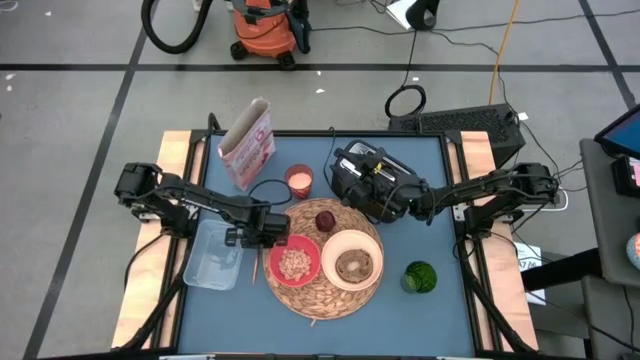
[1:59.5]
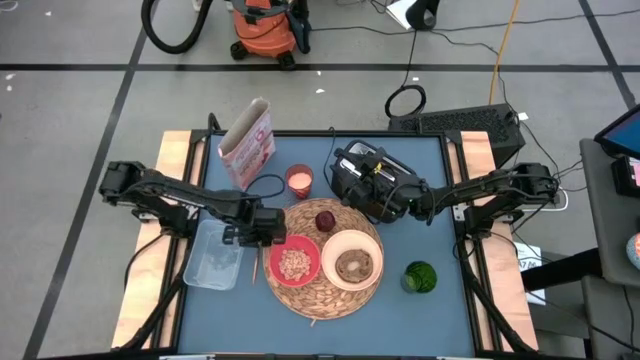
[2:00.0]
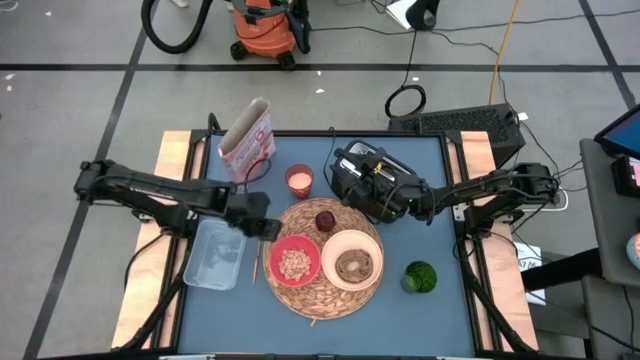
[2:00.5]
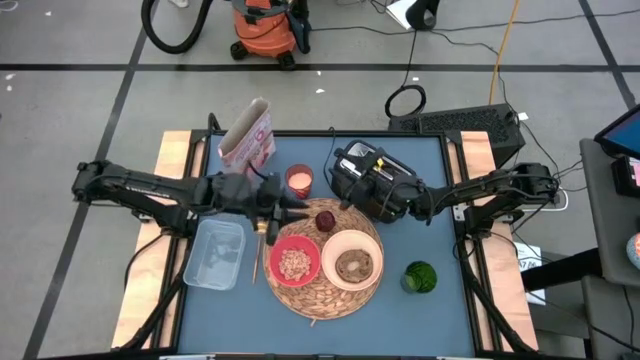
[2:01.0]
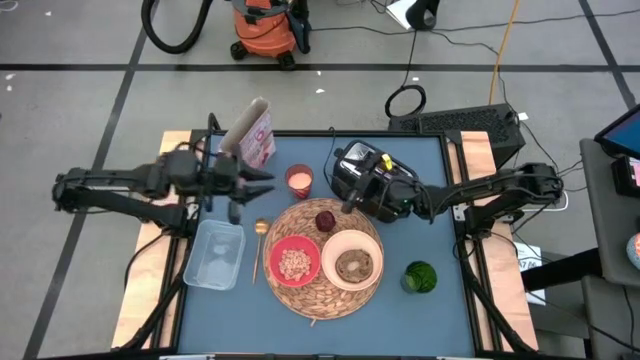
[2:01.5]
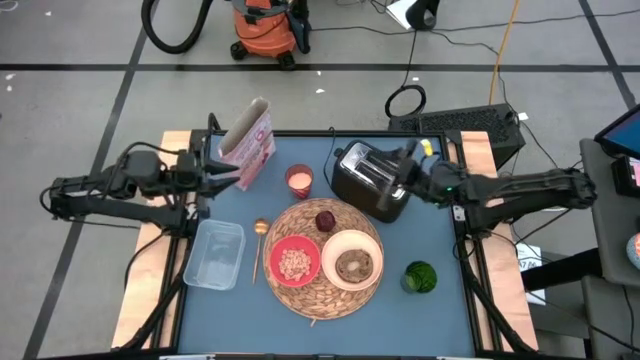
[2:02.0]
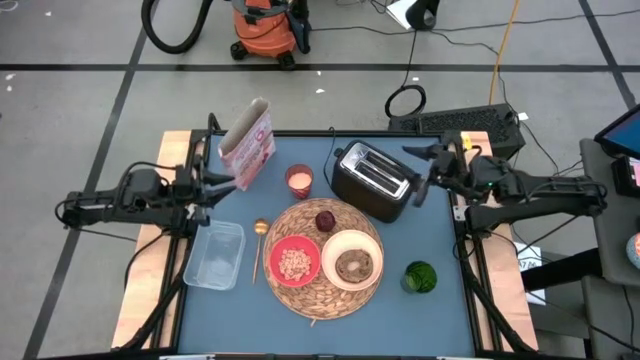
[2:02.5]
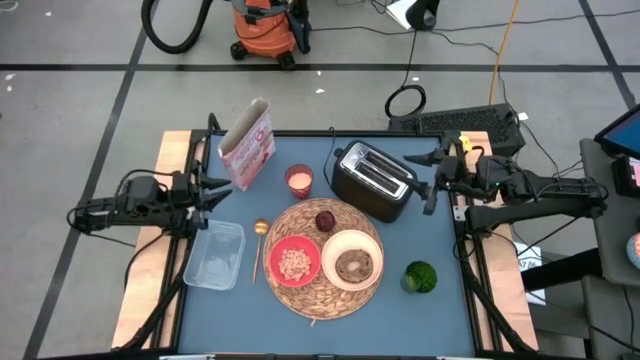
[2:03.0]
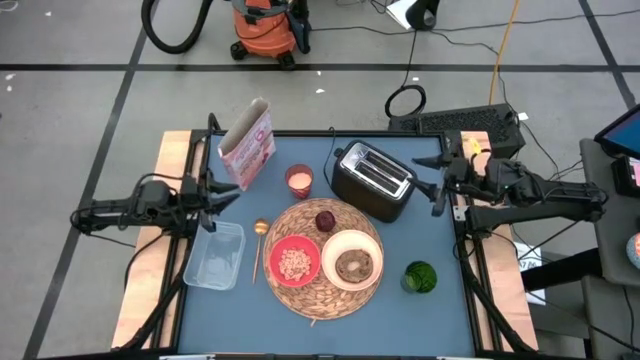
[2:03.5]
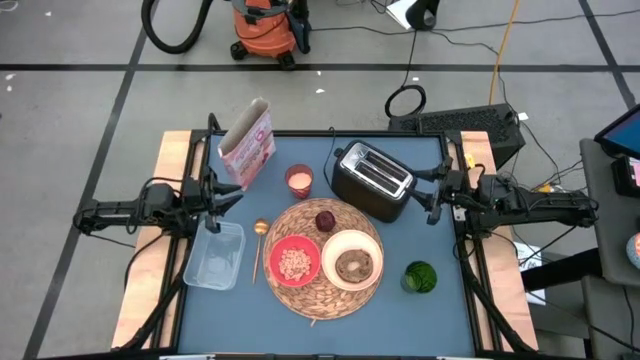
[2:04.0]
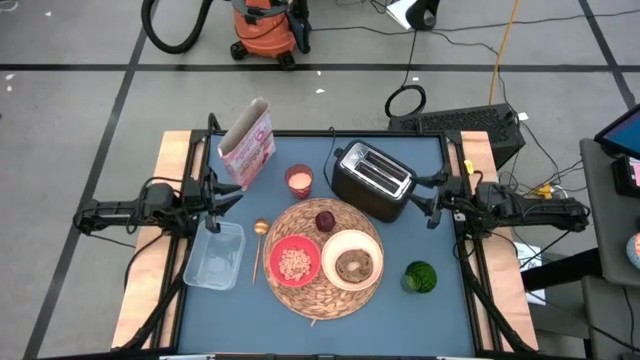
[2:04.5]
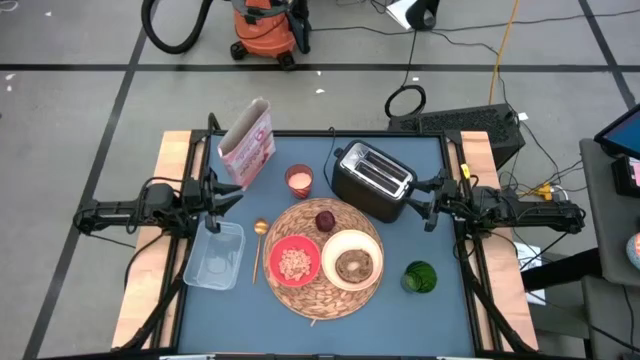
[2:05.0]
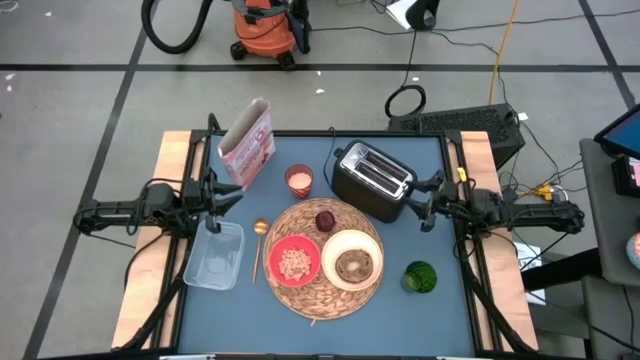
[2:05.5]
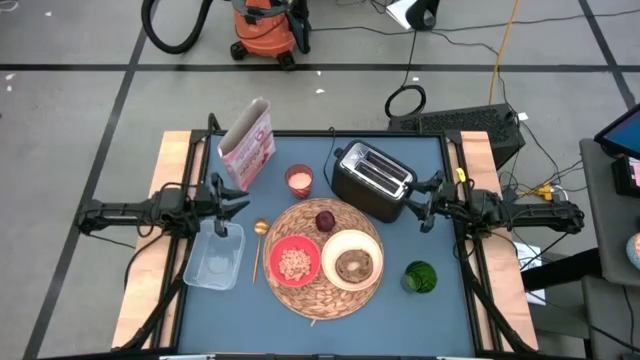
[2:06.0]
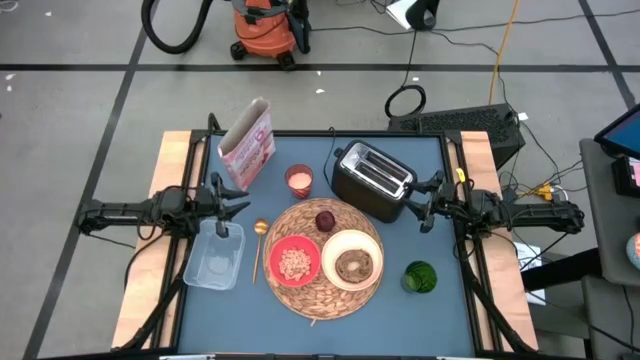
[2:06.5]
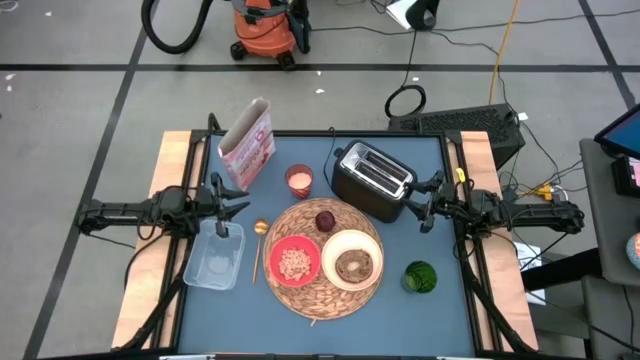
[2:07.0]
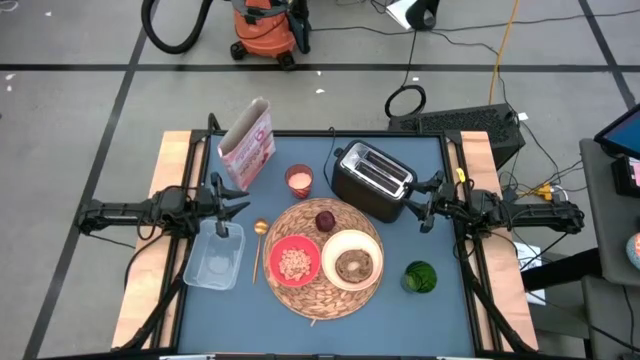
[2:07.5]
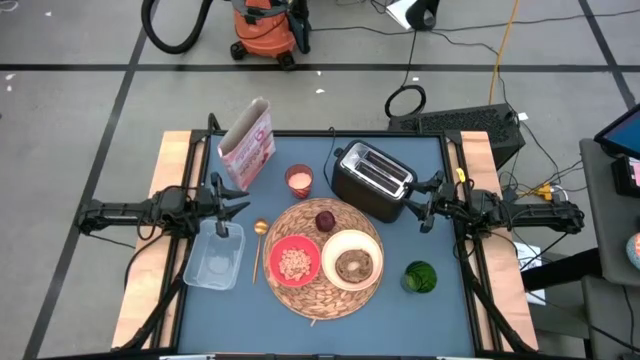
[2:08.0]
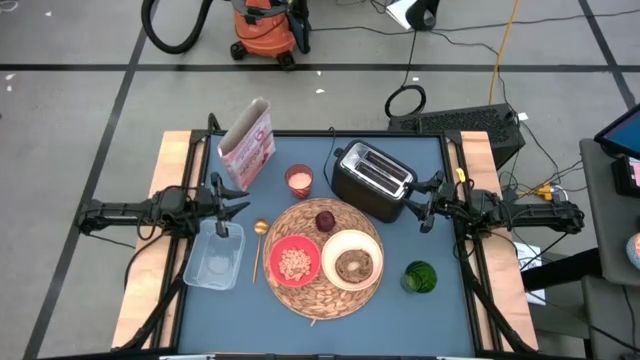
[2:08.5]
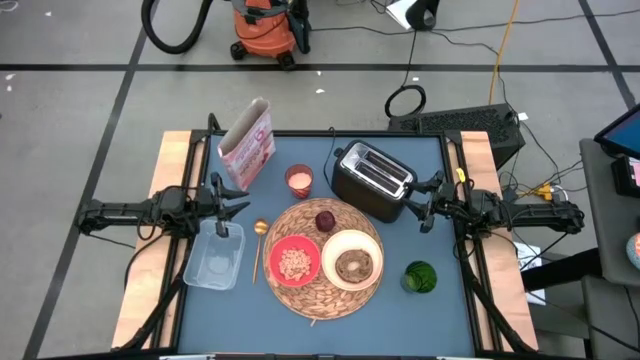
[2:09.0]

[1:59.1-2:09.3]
Task: Arrange a breakfast setting
Return to Home Position
